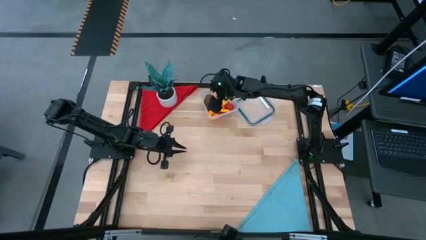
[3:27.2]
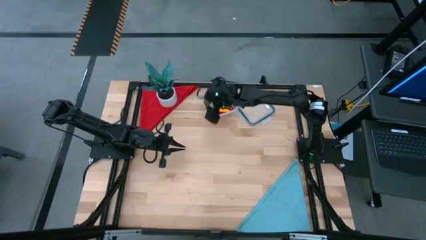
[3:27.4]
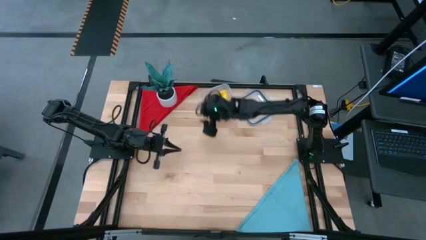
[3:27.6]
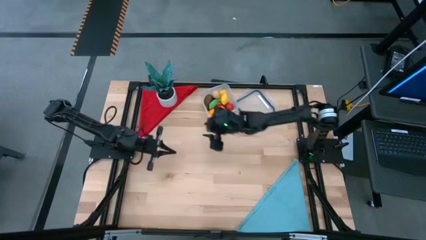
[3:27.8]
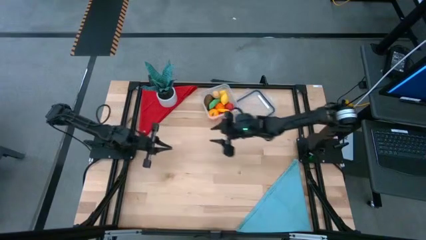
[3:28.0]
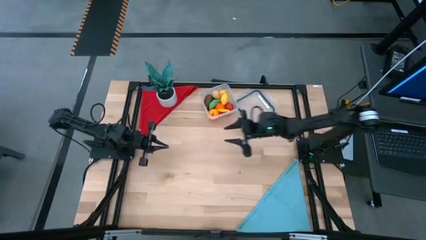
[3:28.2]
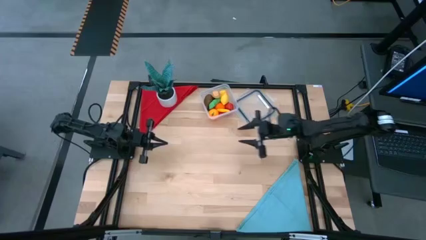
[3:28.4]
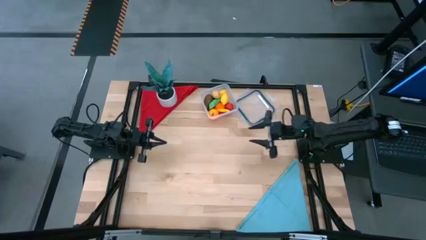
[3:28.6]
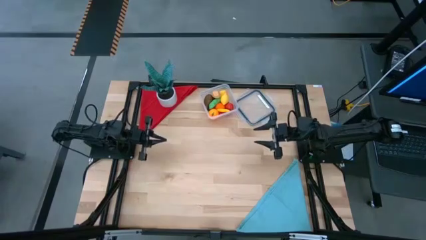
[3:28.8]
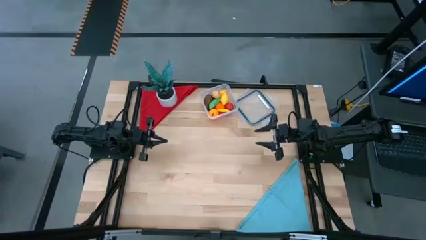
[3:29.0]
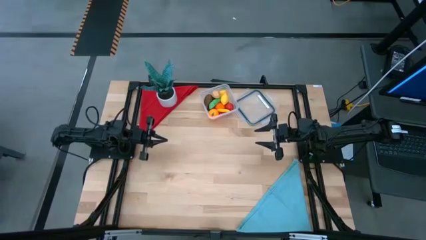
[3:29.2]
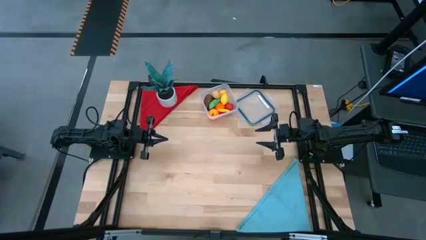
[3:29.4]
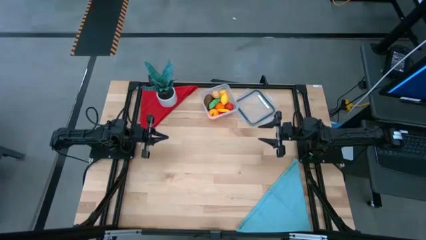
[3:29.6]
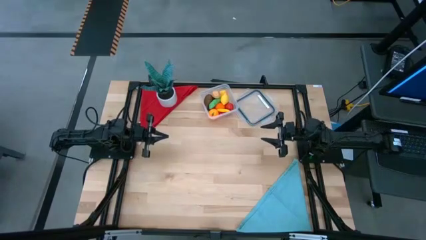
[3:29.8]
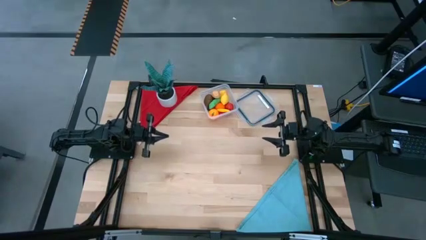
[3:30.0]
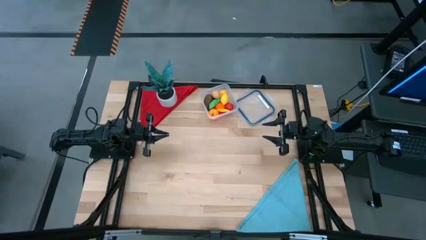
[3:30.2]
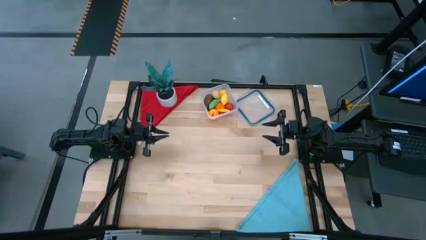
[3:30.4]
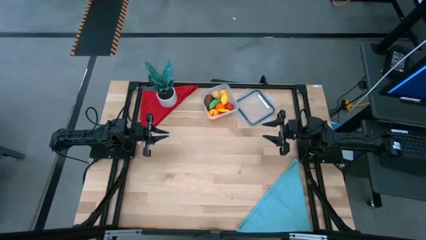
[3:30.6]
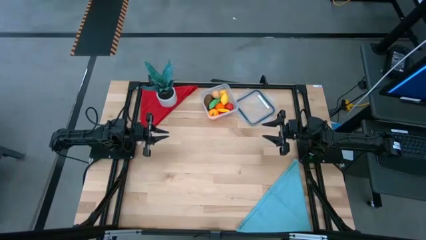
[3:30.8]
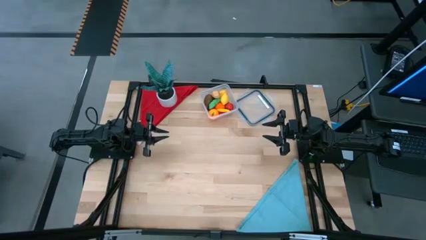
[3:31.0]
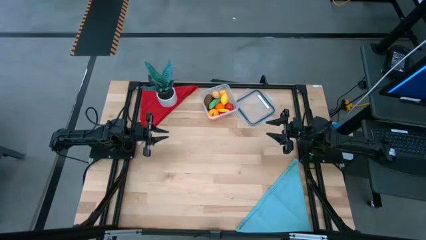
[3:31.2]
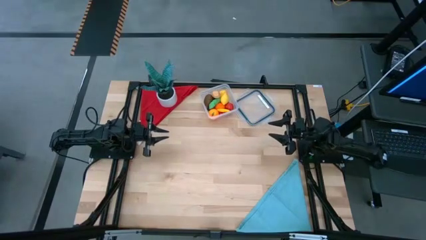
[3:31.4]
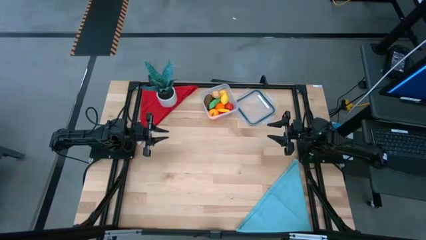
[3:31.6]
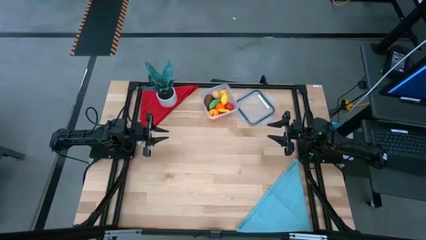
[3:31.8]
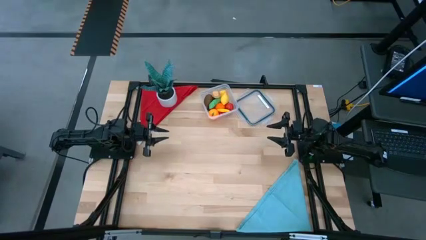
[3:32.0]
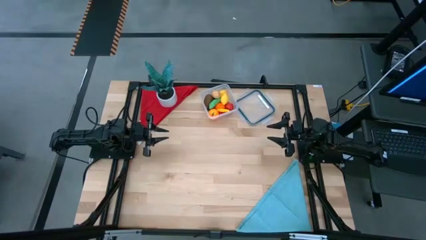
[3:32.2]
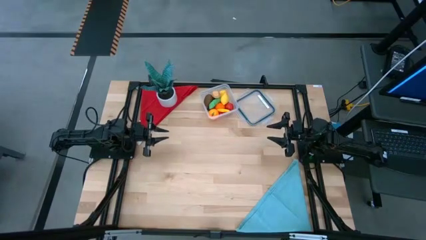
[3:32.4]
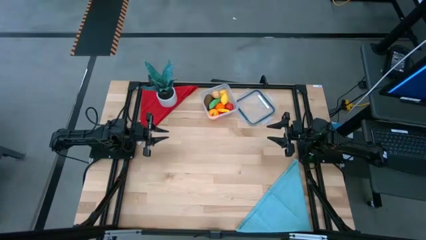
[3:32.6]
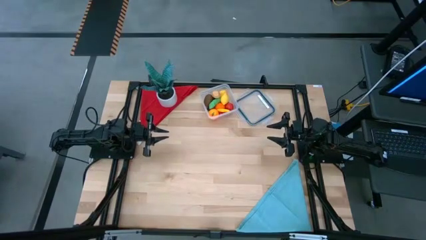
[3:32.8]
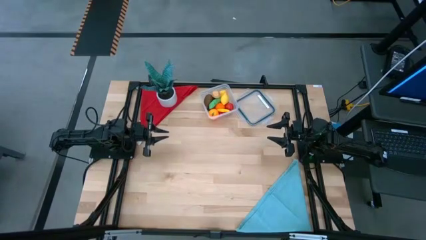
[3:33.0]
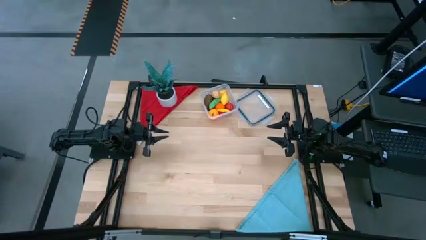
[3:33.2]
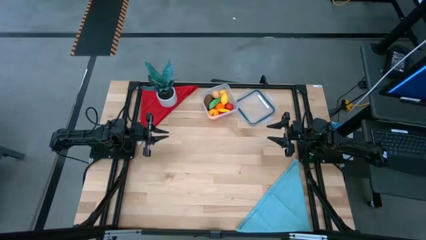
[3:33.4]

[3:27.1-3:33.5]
Task: Pick and placing Produce into tupperware
Return to Home Position

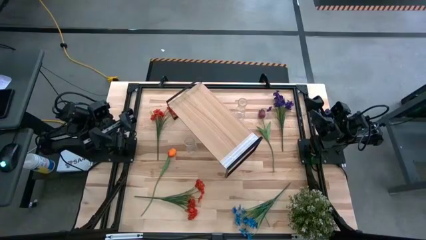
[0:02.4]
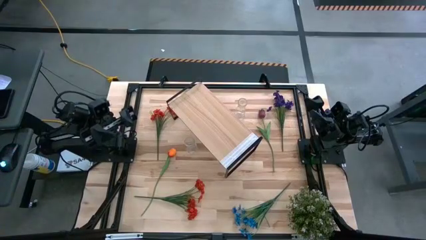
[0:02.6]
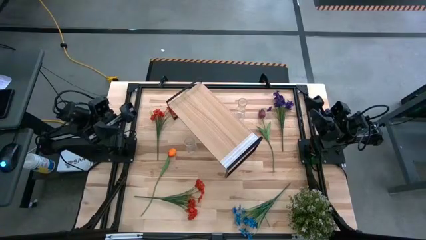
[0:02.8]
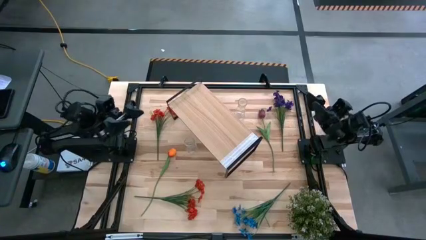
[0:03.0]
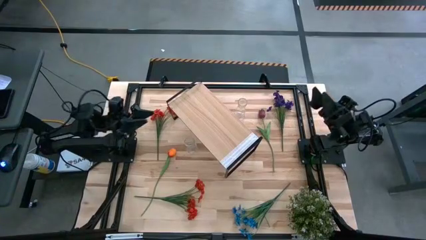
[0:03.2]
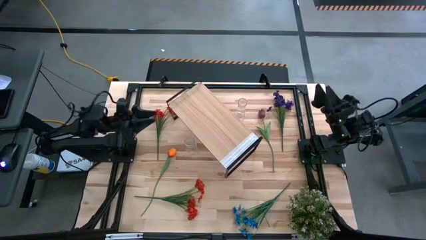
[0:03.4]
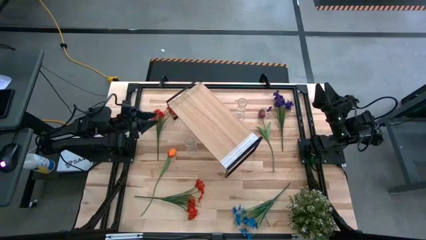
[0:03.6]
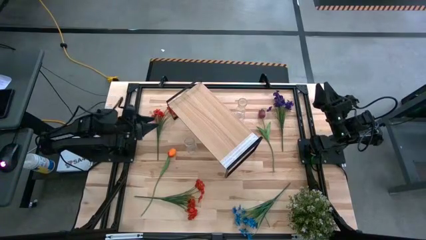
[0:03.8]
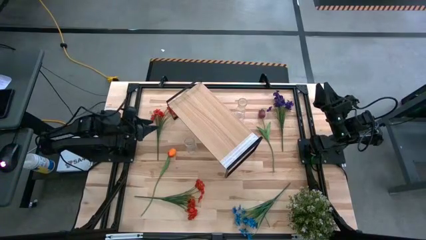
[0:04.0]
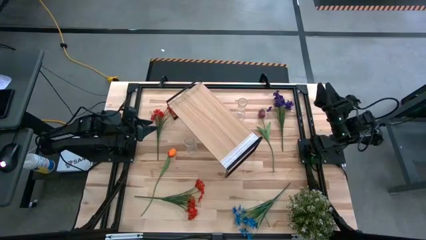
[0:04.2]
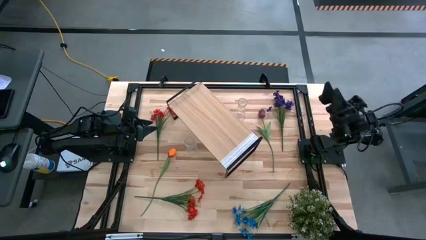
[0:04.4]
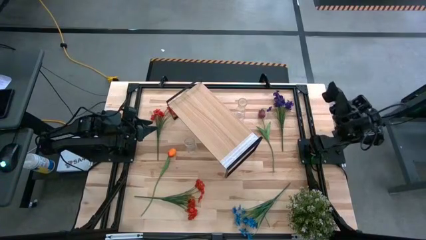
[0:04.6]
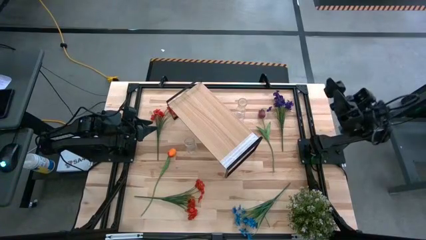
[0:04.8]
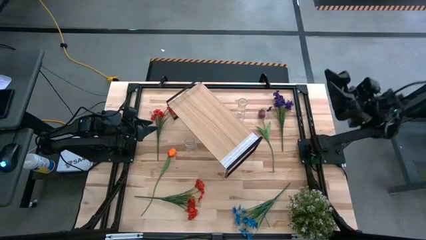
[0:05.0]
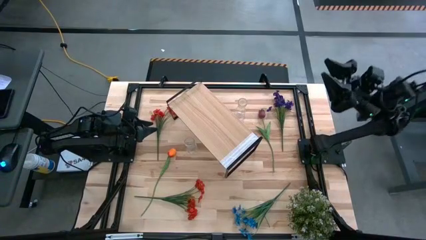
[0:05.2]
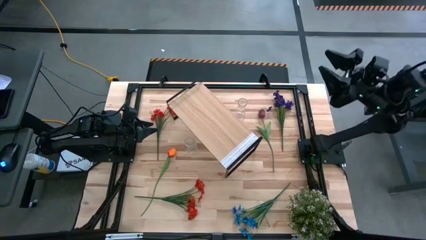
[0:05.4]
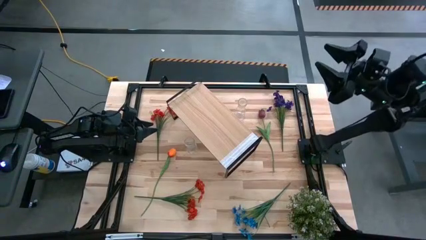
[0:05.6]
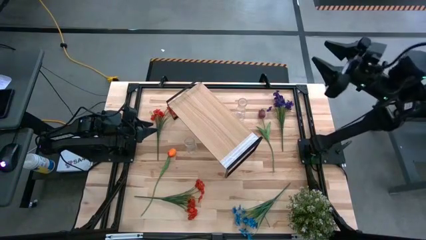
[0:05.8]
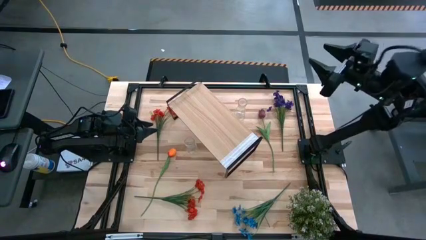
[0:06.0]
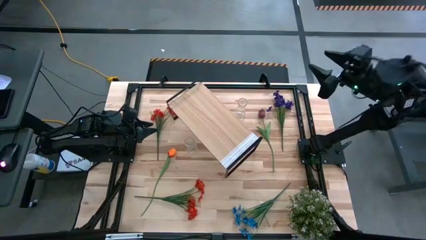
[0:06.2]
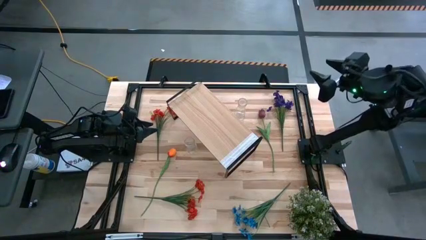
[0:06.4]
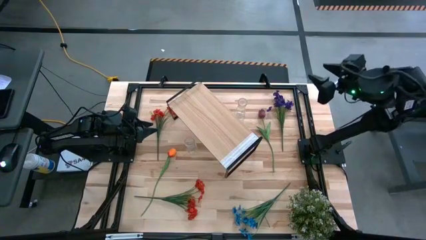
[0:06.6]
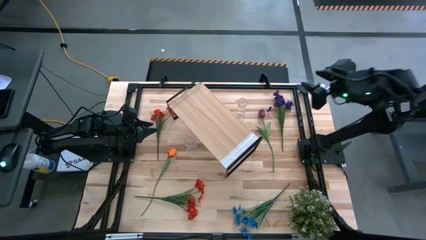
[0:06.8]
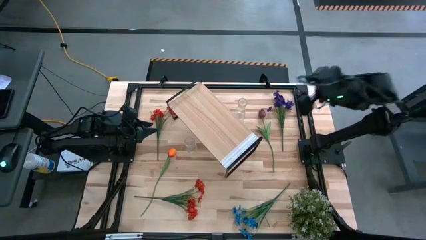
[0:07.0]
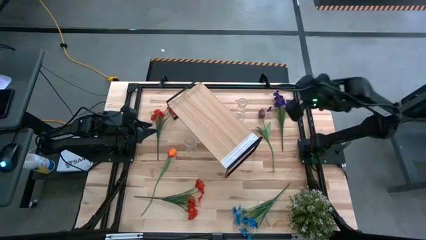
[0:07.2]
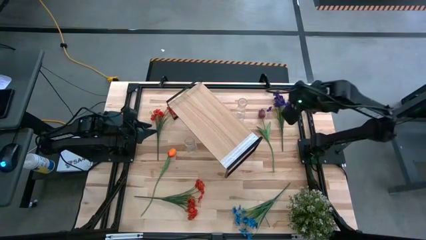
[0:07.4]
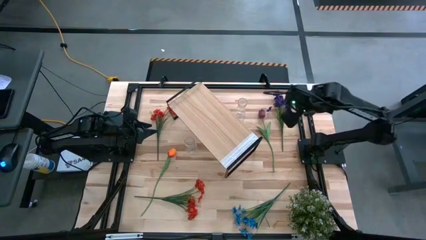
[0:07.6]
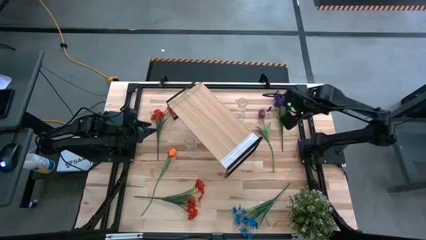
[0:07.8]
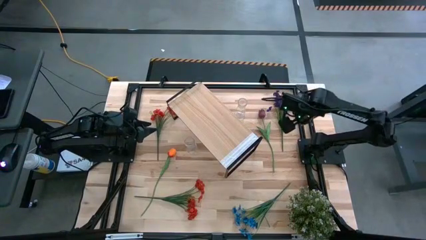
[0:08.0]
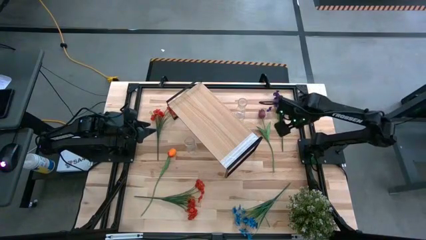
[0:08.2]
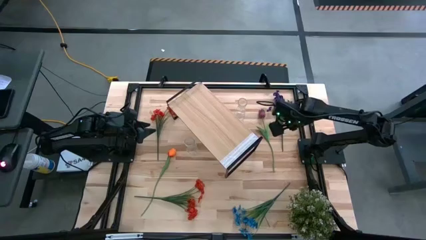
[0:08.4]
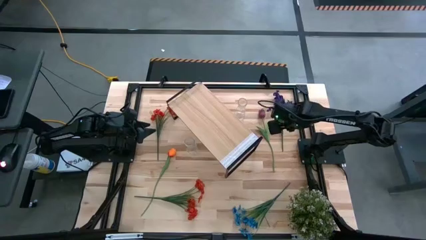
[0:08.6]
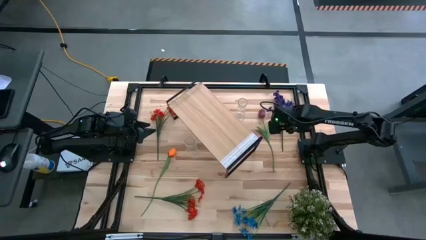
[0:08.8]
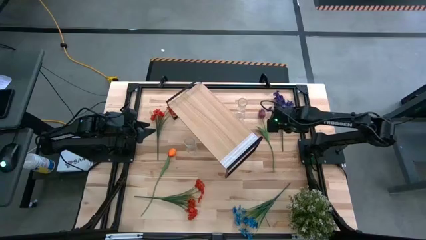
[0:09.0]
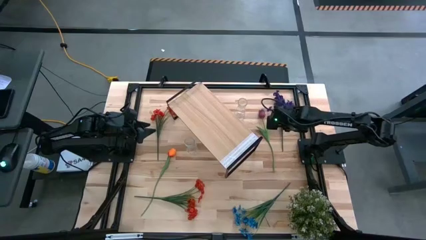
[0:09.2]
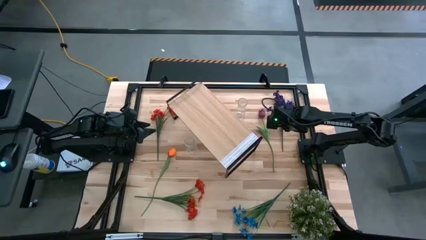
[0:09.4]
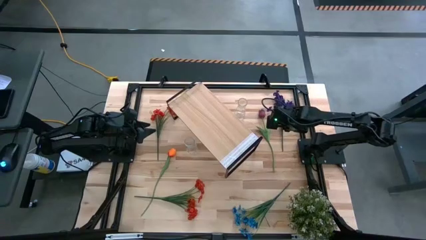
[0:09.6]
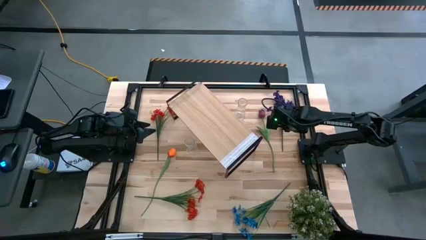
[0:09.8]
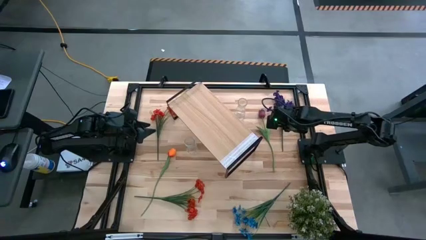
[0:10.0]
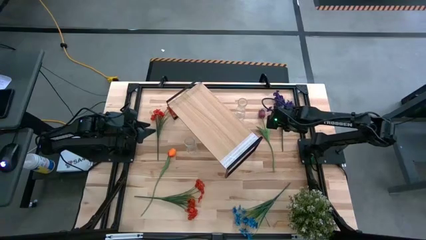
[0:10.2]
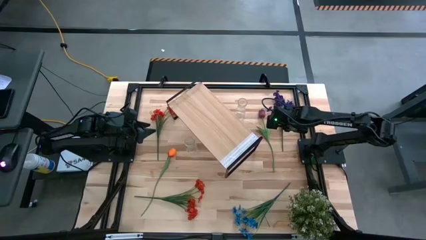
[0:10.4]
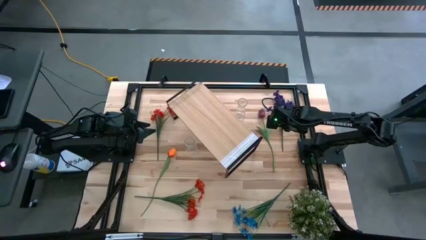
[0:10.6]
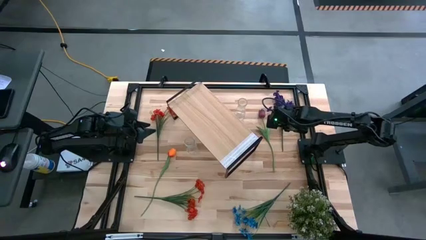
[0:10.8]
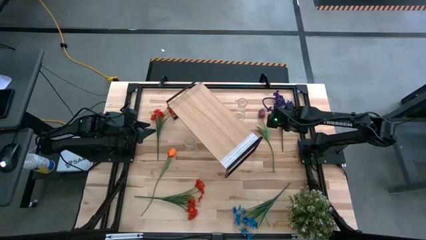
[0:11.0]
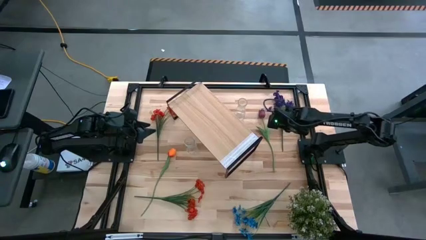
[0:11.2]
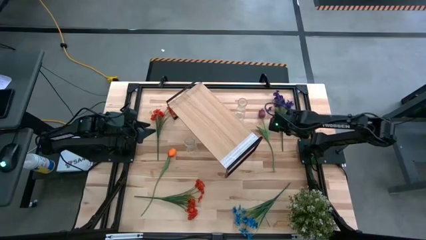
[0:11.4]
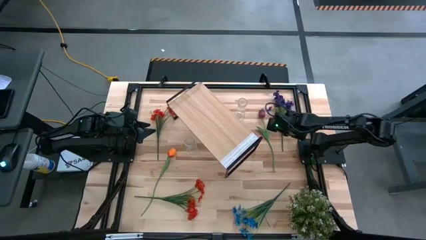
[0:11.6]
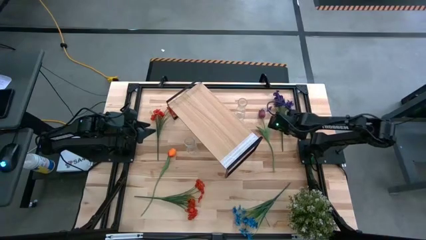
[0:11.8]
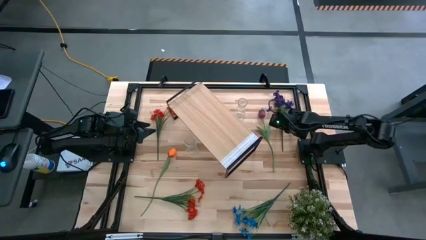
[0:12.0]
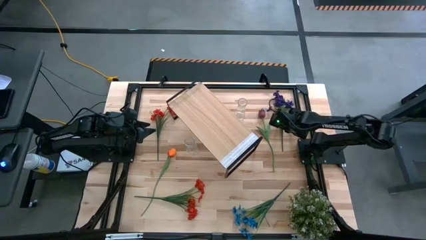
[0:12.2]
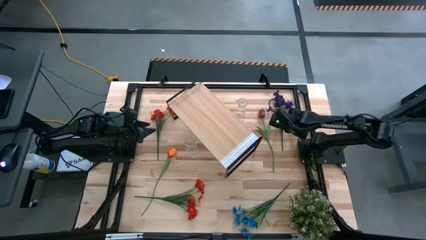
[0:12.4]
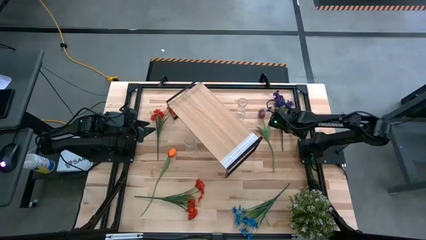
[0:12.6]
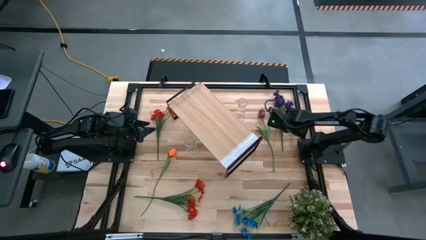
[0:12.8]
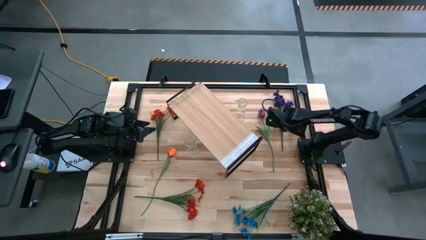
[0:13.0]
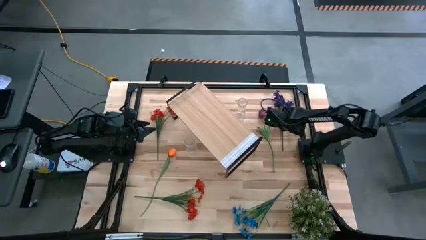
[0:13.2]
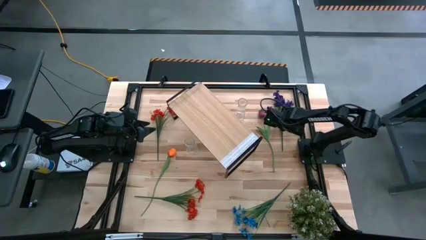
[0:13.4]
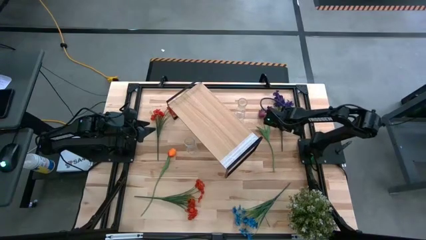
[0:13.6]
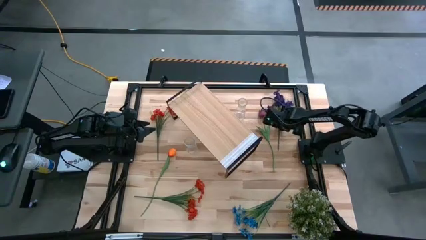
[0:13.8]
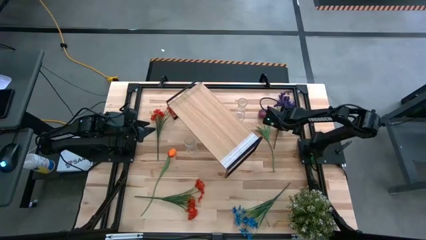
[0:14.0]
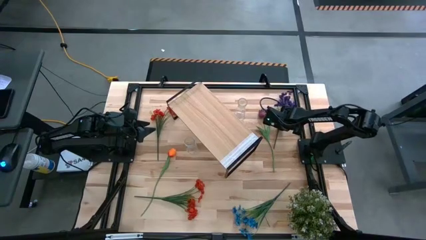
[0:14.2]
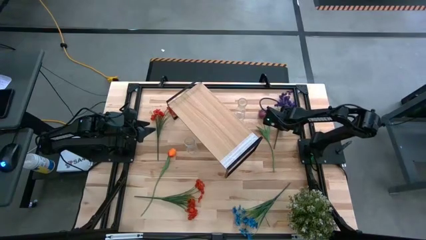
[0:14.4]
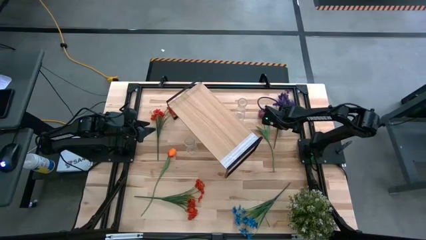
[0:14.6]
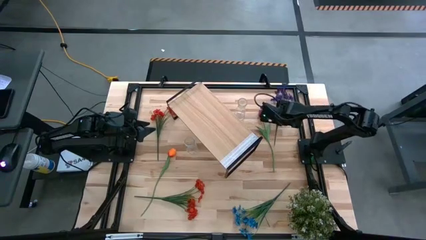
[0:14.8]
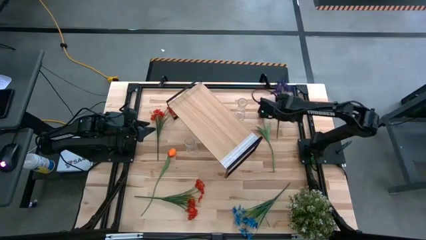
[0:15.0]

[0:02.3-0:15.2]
Task: Pick and place flowers into a vace then onto a shelf
Put the violet flowers into the top transparent vase
